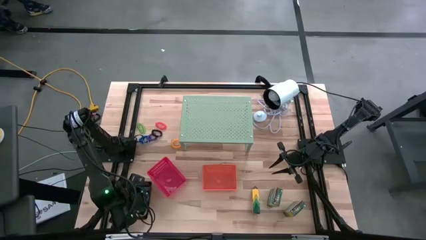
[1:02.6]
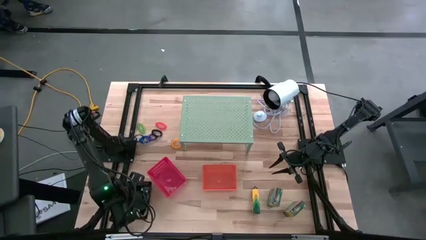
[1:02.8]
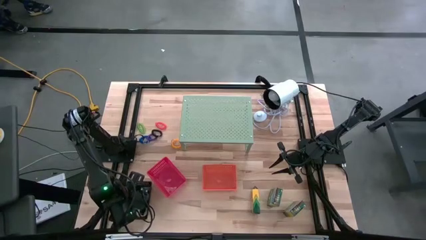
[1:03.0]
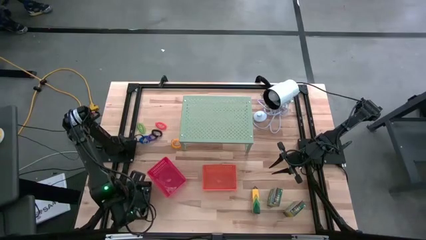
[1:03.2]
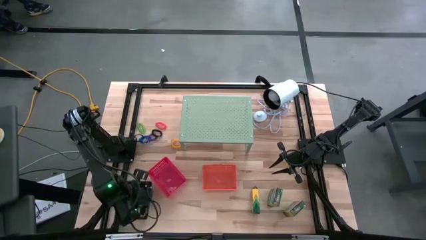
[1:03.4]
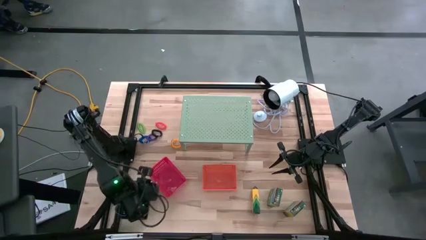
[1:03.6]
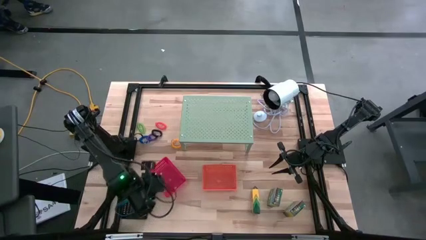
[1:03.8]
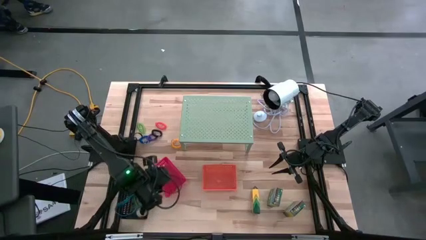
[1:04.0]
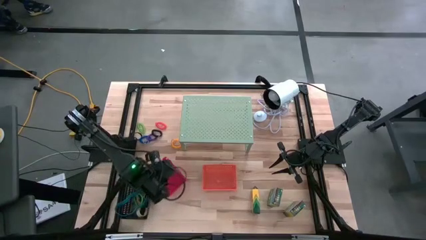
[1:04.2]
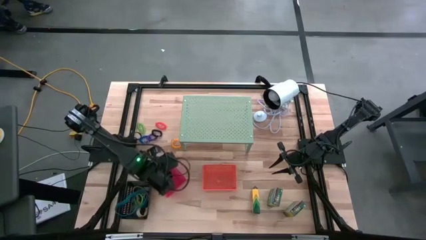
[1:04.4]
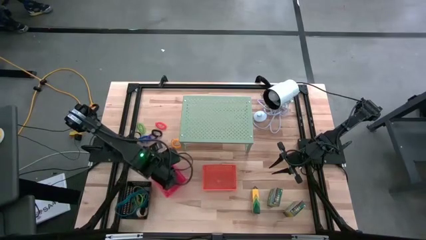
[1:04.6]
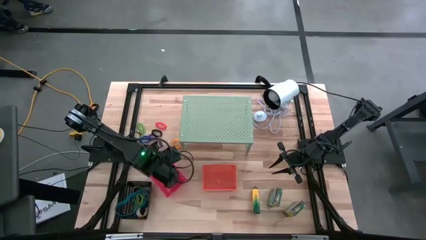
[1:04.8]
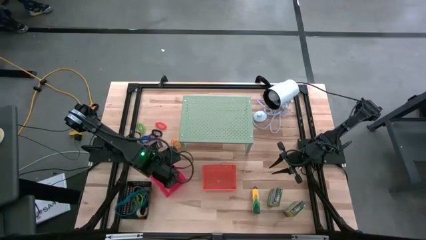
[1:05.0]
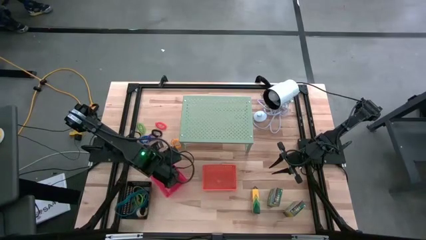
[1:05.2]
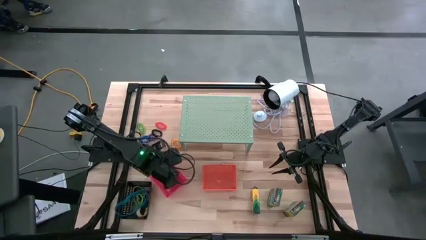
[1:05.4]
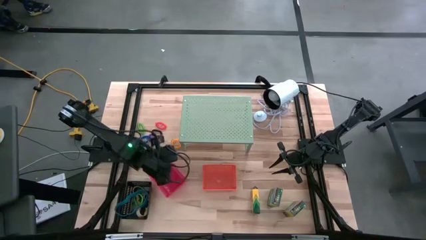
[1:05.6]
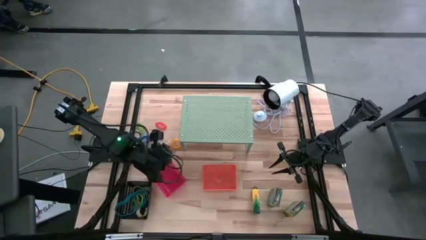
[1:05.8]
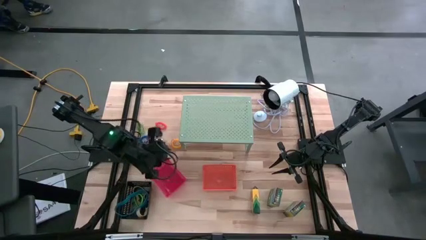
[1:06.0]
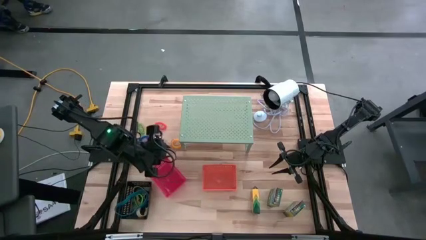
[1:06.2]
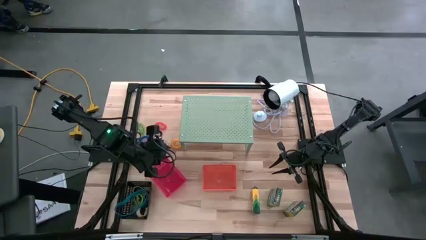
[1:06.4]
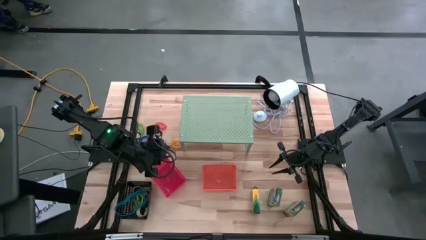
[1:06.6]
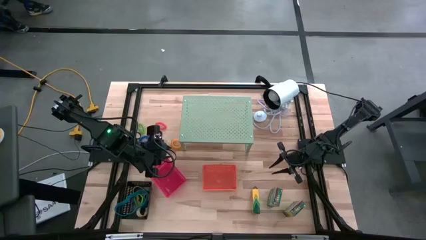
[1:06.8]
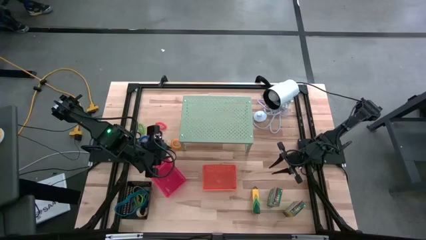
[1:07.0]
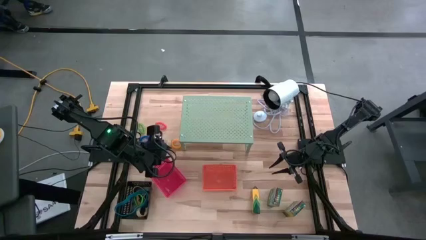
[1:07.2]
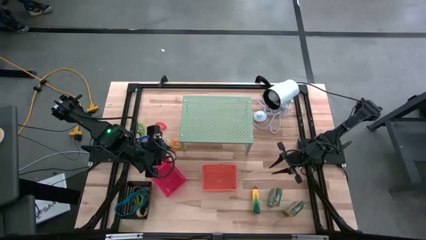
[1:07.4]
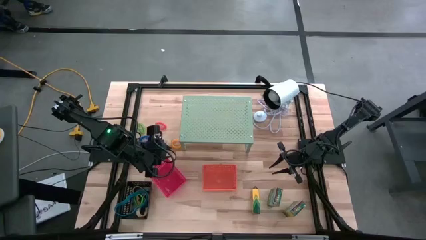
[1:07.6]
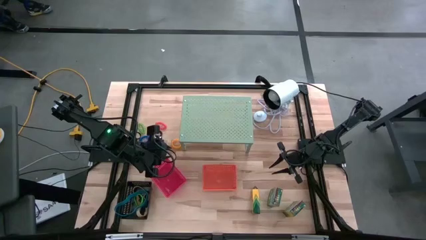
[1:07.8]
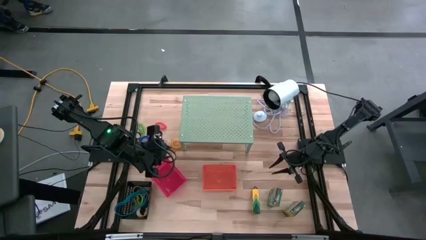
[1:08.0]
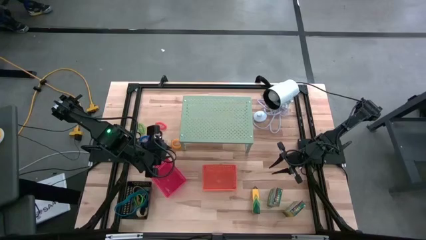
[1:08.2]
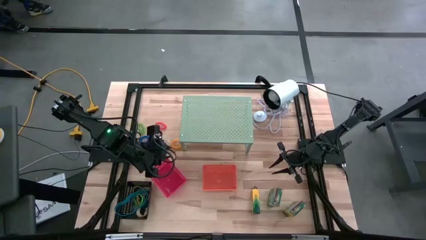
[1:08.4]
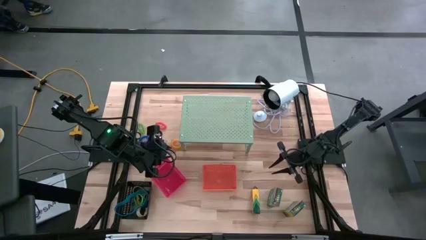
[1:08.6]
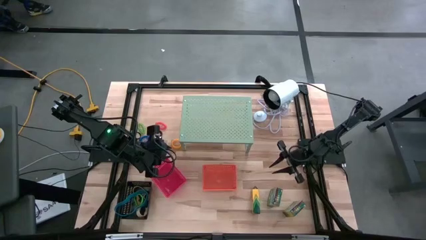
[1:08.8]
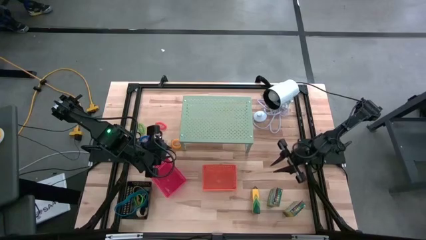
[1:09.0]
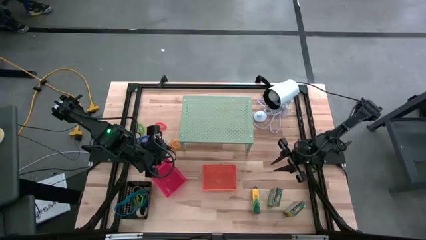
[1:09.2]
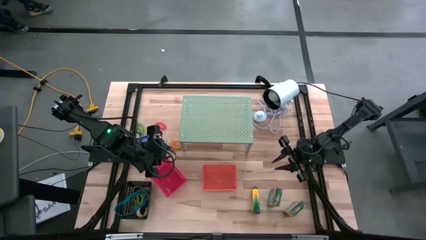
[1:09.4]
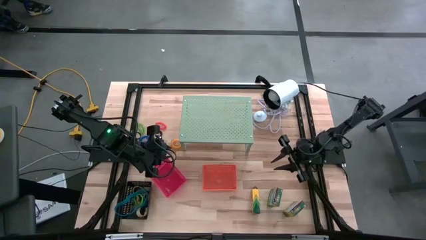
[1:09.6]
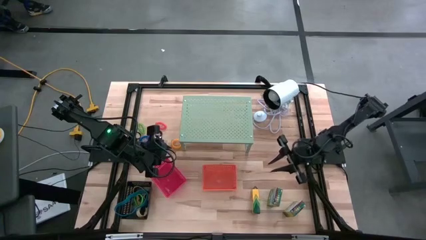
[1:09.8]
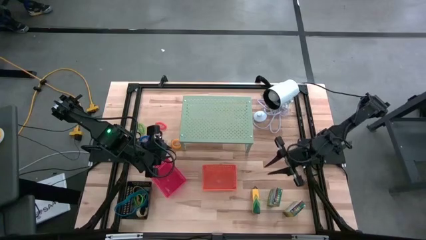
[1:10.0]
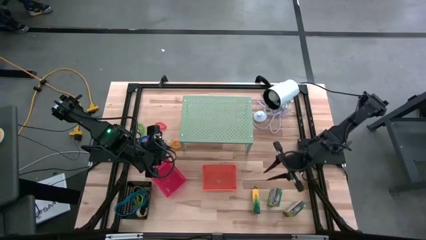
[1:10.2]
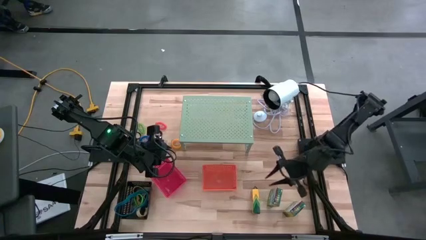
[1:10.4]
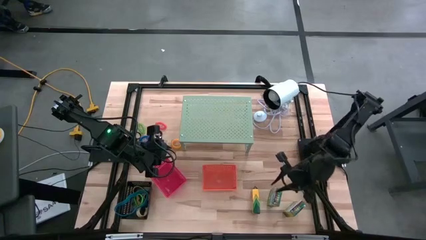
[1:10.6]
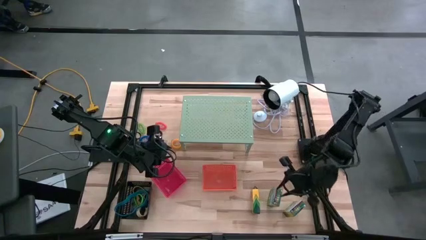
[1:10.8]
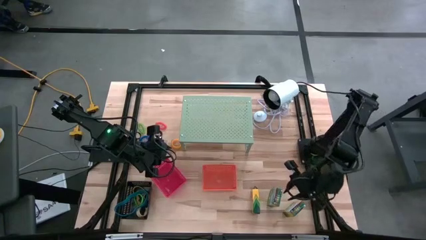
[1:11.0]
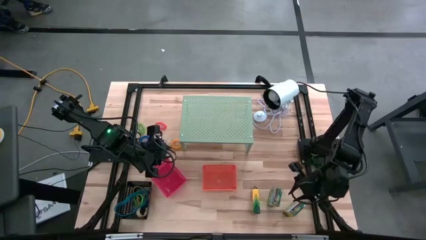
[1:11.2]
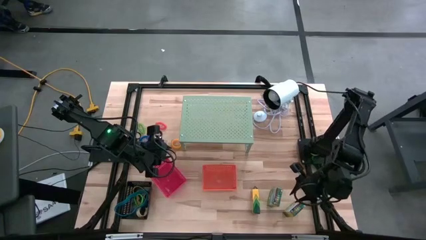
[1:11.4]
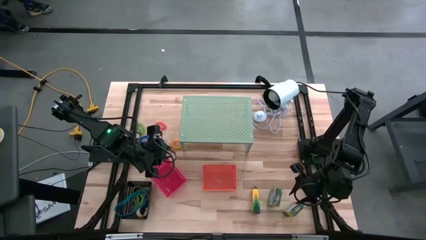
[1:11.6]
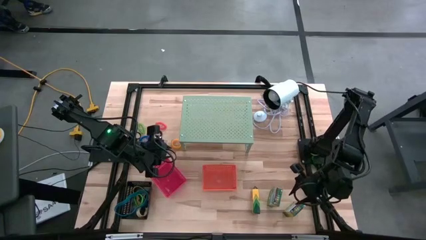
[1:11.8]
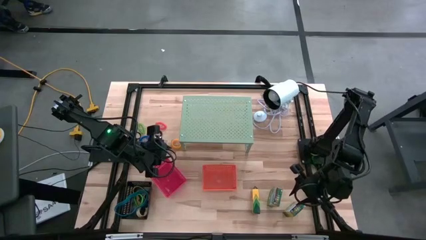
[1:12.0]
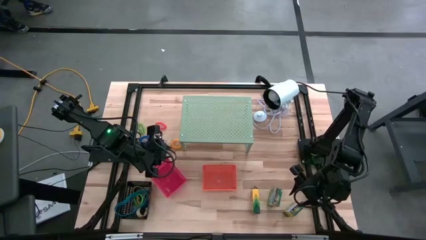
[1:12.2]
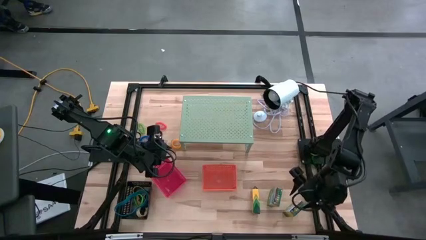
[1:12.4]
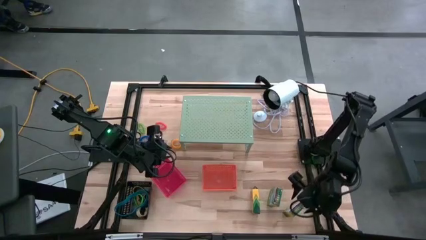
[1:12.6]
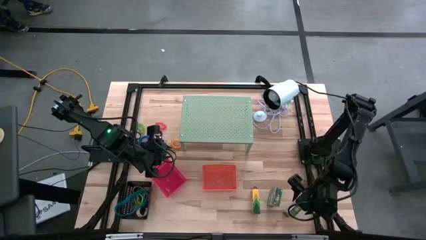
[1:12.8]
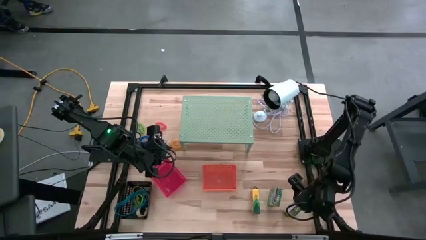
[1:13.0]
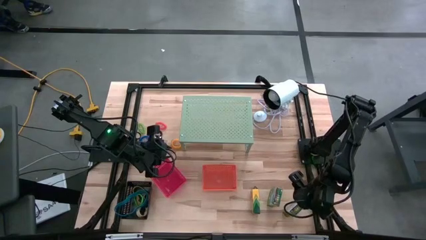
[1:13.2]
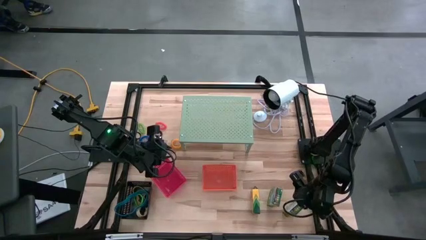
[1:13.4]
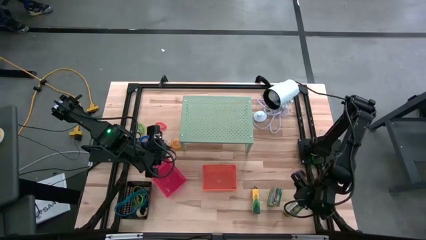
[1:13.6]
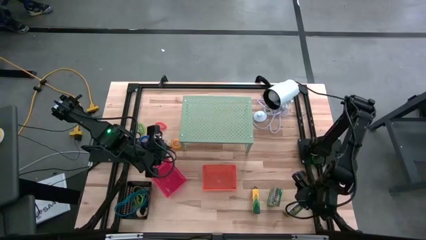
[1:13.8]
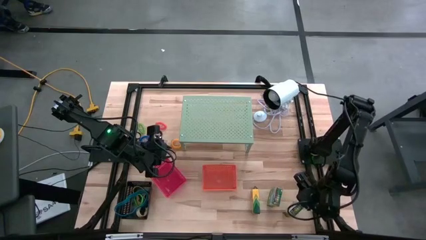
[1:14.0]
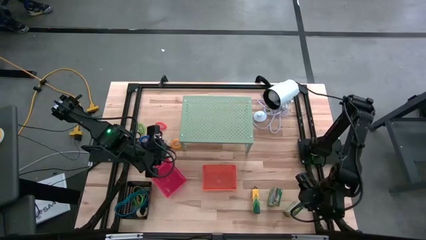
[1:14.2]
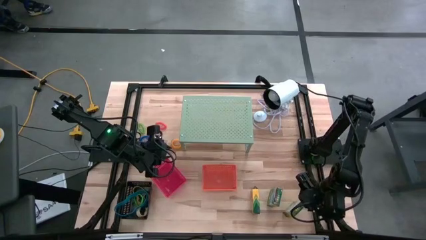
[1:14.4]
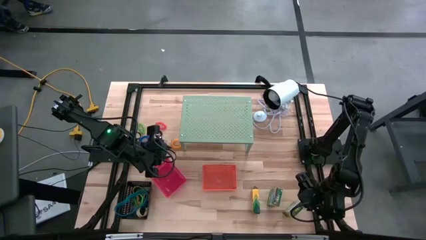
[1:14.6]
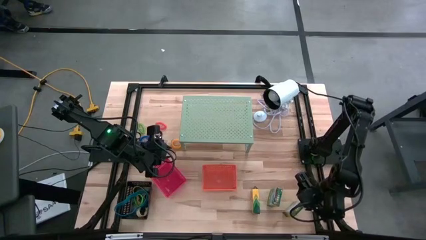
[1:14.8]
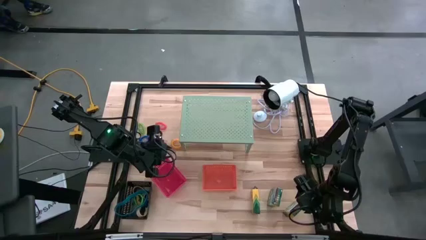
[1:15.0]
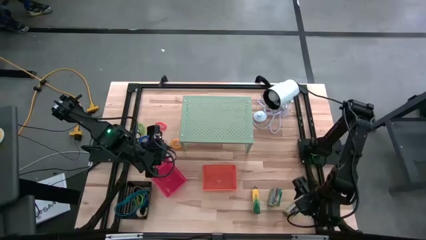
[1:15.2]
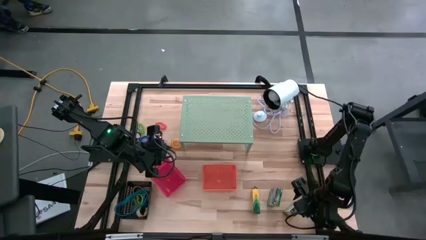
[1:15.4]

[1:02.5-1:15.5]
Task: Pick & Place Office Desk Supplies
Put the right crayon box into the orange bin

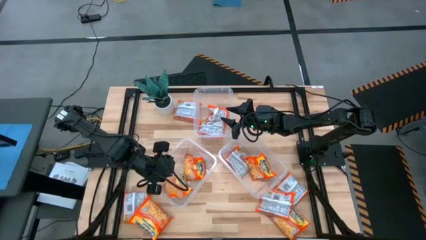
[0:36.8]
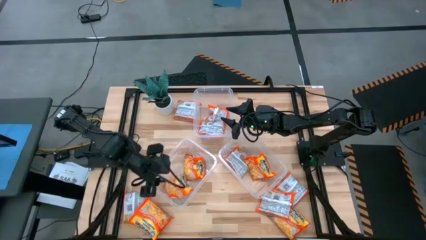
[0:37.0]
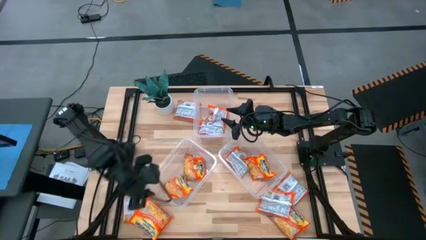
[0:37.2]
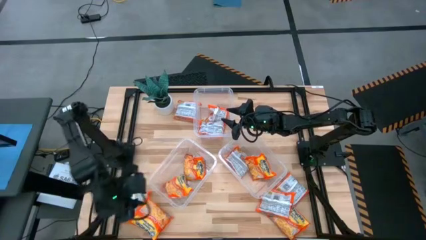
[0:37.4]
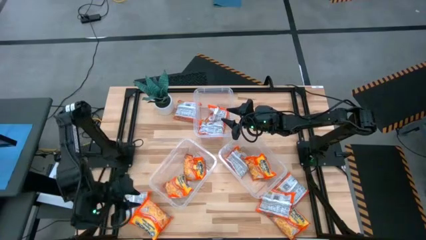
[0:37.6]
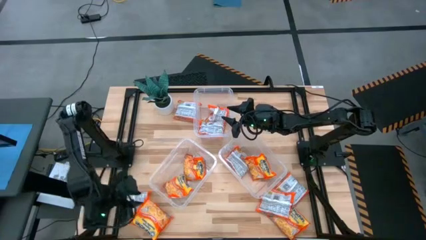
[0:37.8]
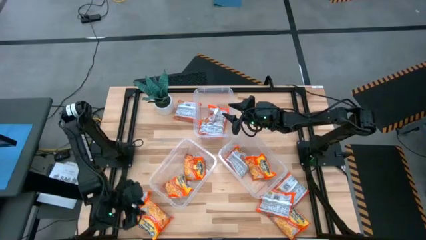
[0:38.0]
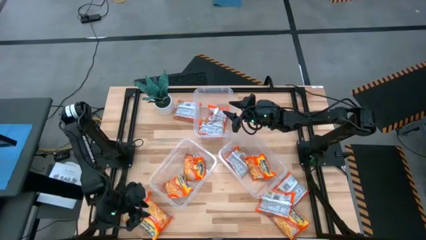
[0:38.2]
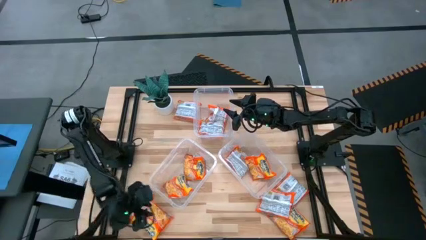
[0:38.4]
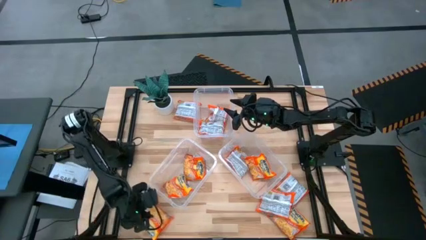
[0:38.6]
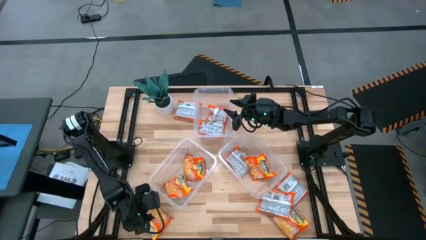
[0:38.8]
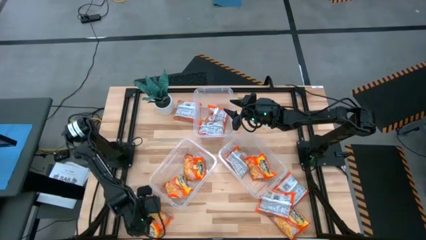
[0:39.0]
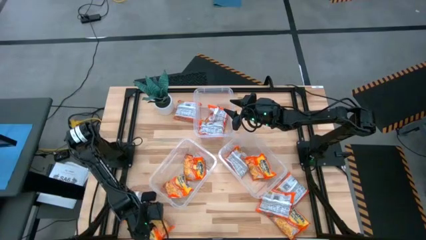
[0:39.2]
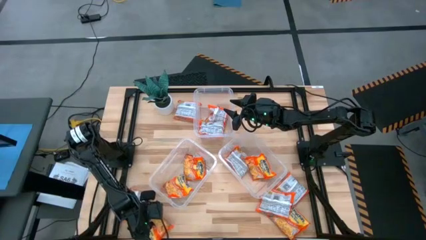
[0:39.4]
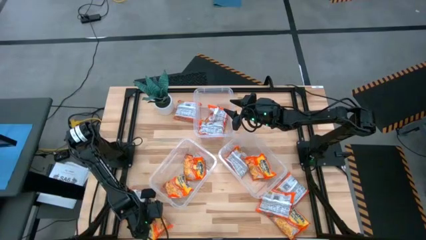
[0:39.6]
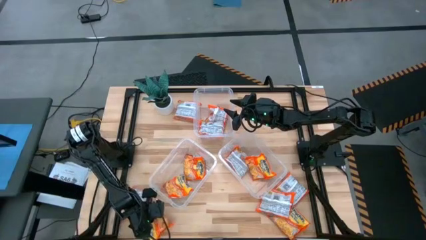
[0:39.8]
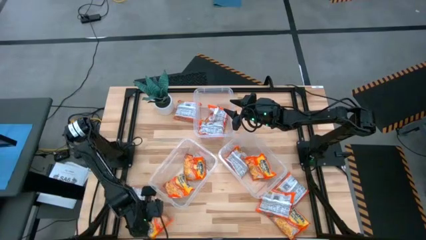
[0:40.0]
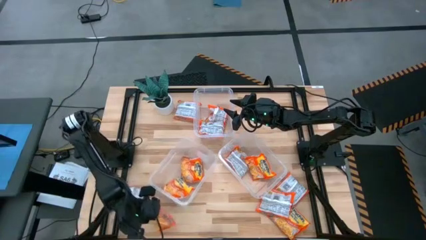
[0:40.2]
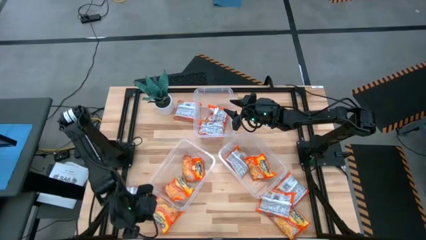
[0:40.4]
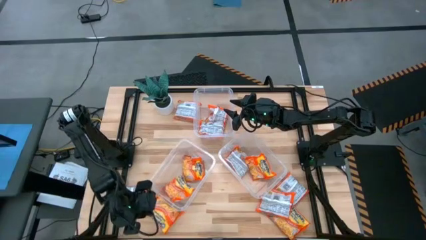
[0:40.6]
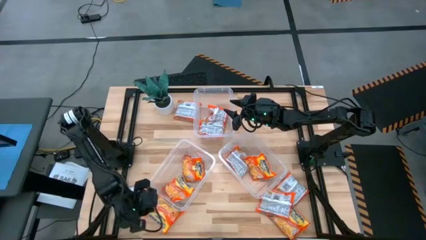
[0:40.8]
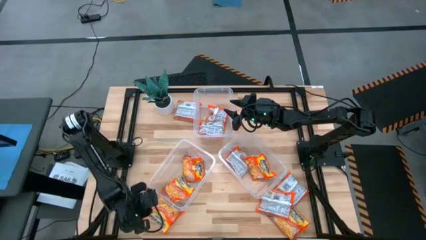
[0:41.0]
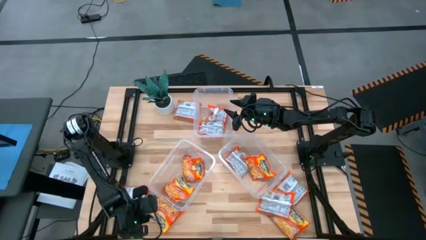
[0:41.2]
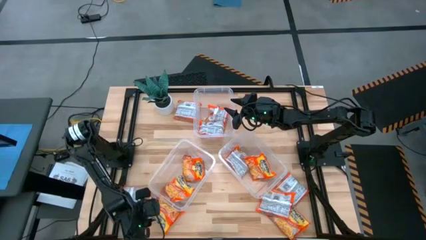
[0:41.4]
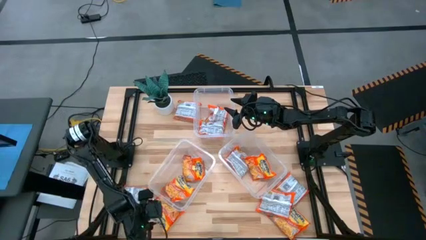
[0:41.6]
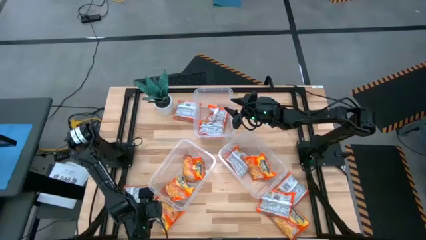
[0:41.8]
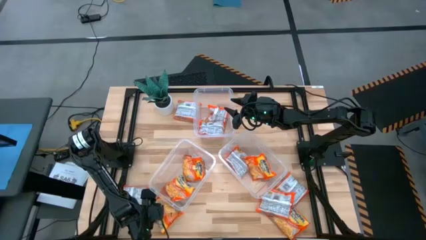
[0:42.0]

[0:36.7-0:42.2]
Task: Sort Maruchan noodles
Put the noodle pack into the bottom left transparent bin
